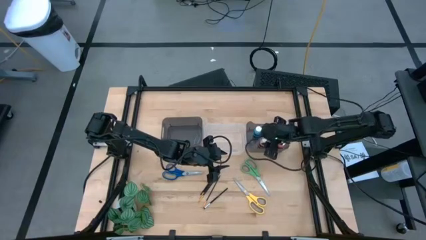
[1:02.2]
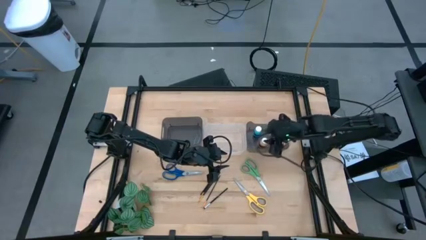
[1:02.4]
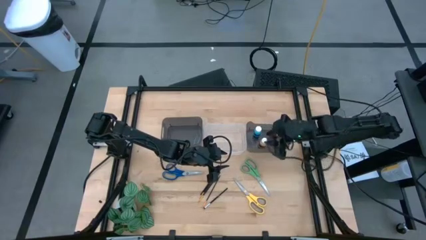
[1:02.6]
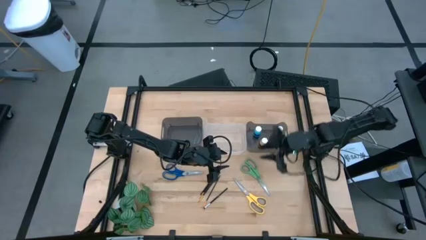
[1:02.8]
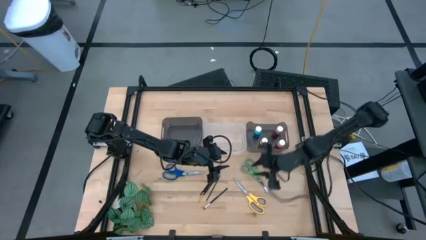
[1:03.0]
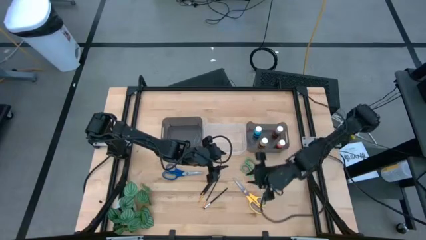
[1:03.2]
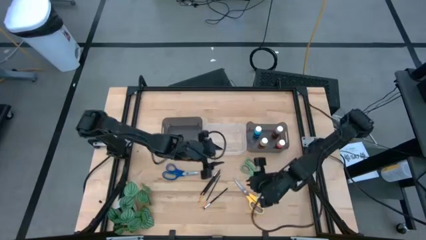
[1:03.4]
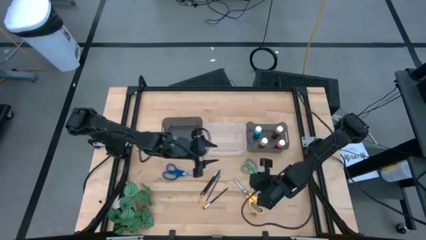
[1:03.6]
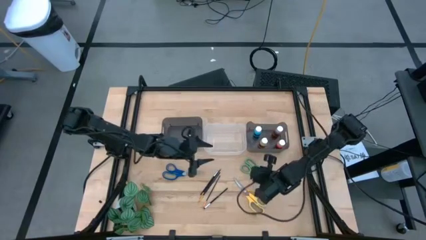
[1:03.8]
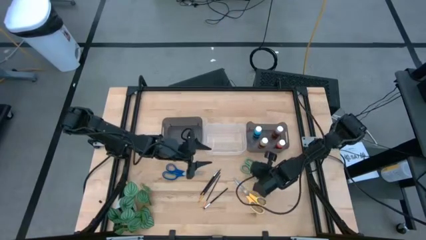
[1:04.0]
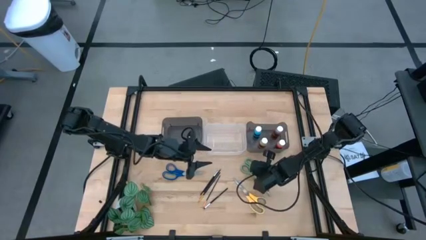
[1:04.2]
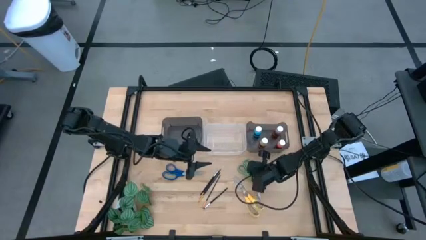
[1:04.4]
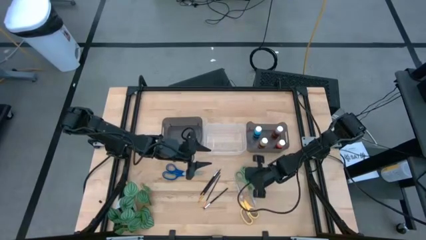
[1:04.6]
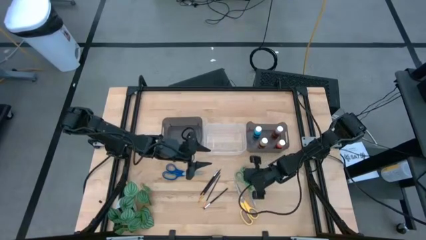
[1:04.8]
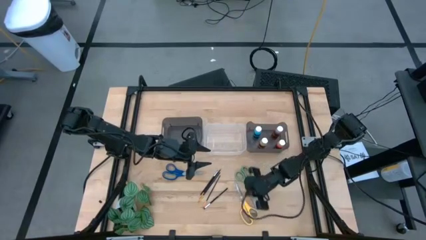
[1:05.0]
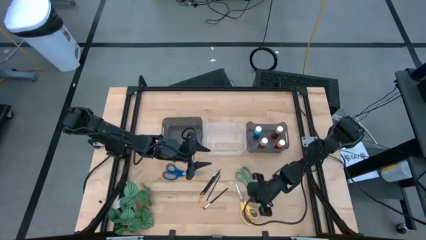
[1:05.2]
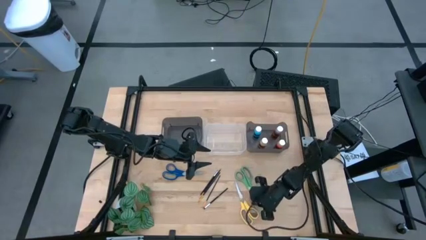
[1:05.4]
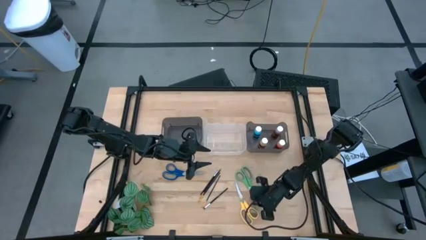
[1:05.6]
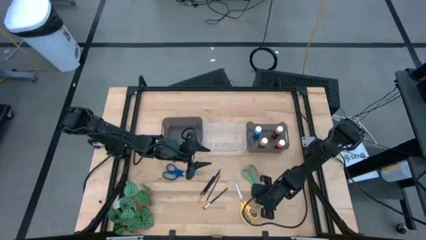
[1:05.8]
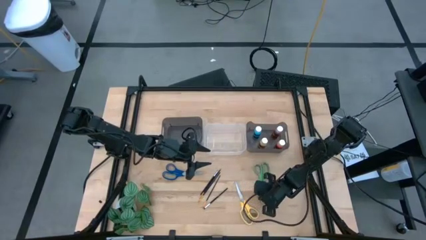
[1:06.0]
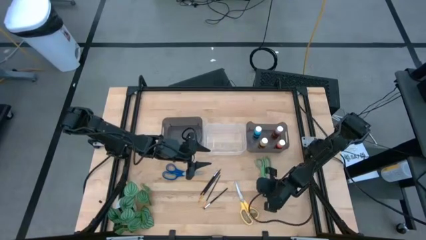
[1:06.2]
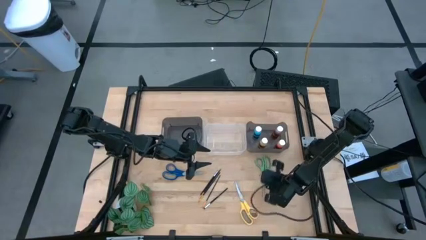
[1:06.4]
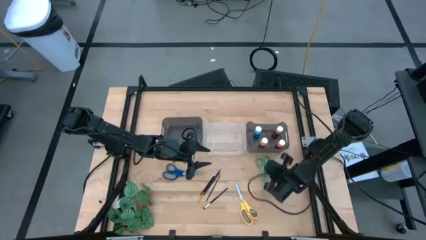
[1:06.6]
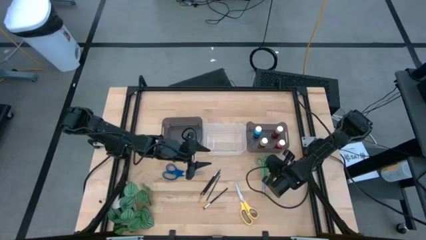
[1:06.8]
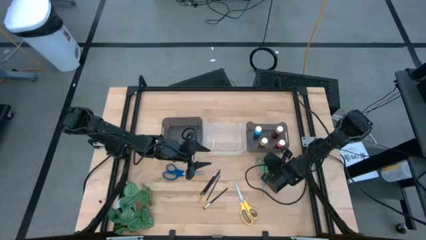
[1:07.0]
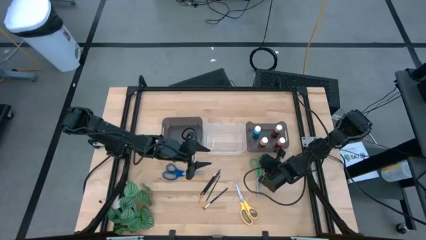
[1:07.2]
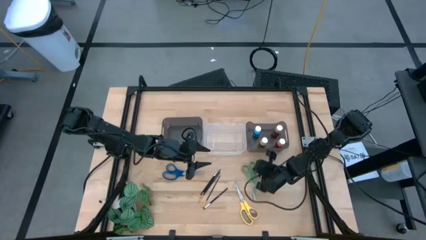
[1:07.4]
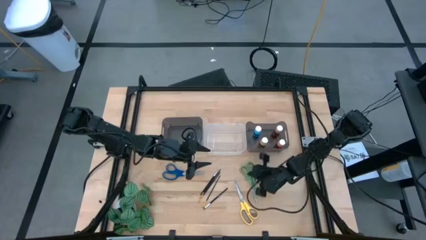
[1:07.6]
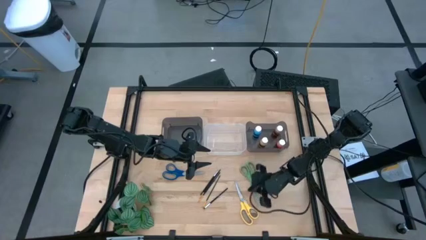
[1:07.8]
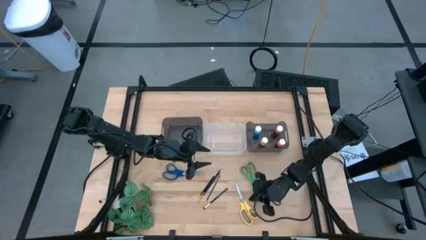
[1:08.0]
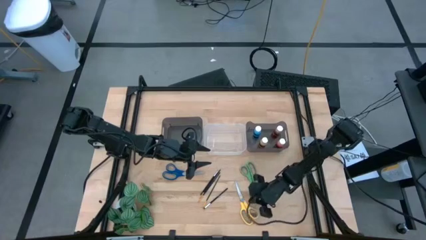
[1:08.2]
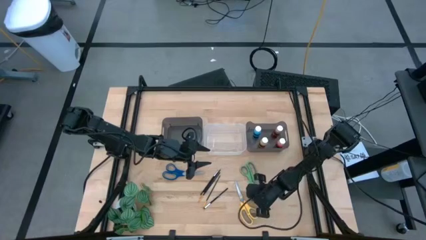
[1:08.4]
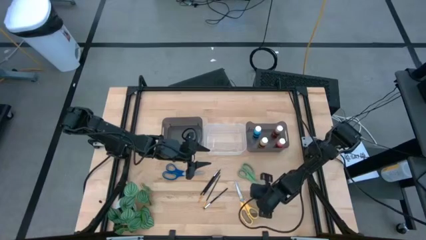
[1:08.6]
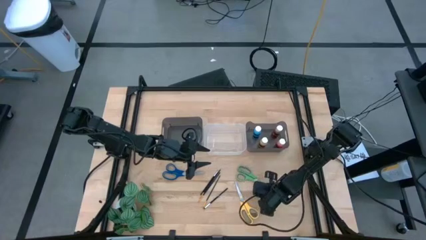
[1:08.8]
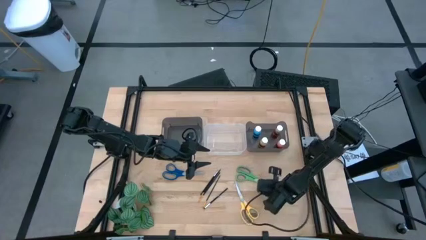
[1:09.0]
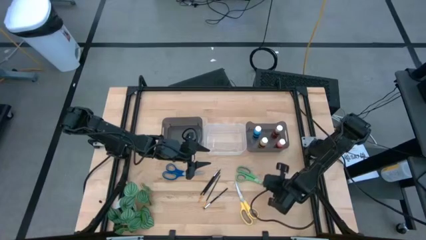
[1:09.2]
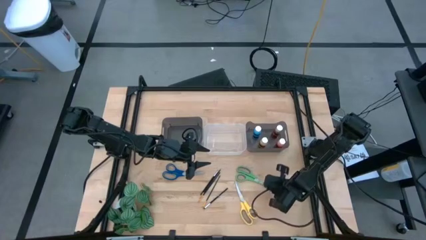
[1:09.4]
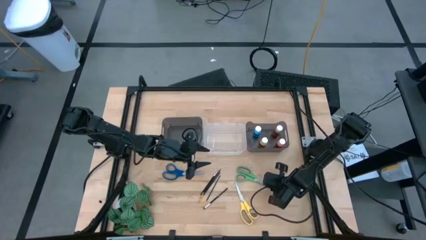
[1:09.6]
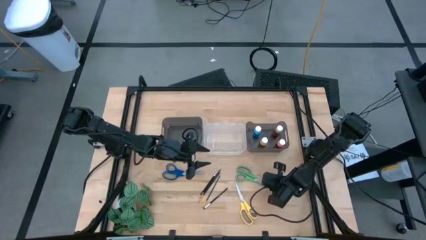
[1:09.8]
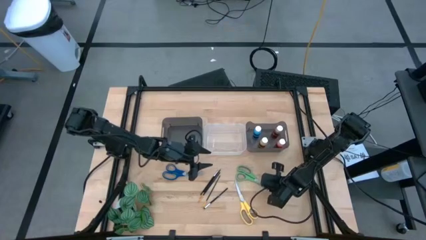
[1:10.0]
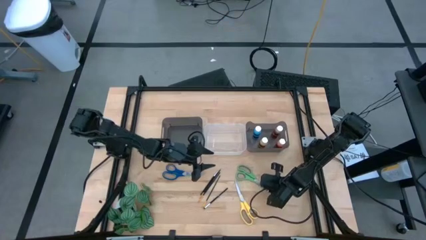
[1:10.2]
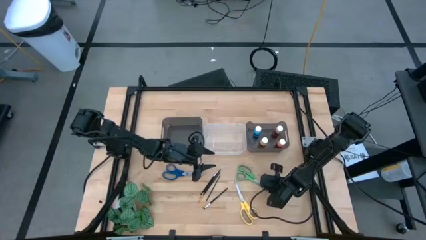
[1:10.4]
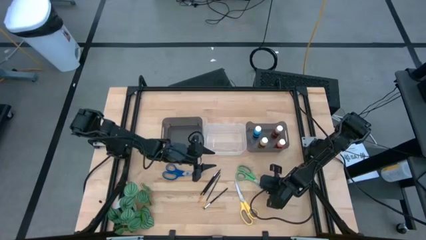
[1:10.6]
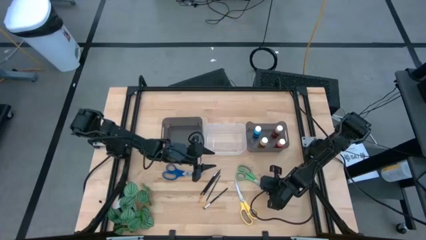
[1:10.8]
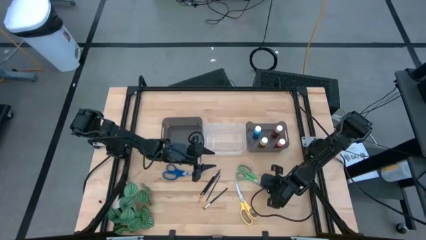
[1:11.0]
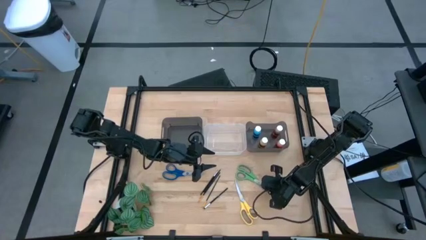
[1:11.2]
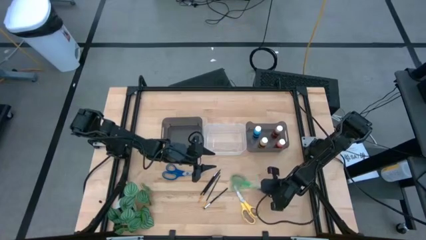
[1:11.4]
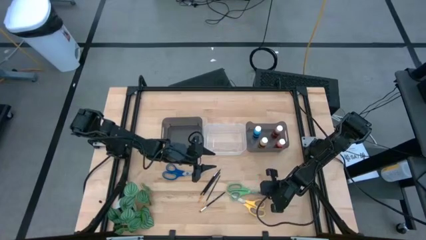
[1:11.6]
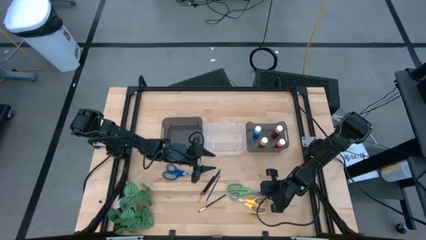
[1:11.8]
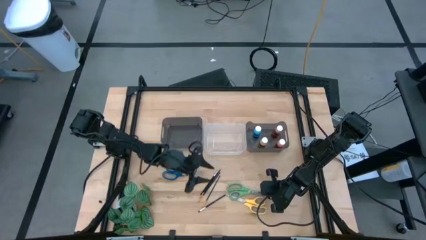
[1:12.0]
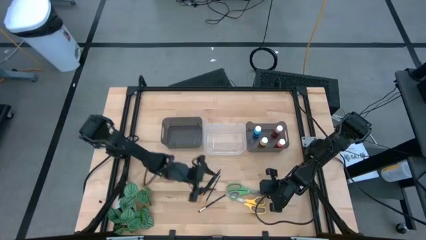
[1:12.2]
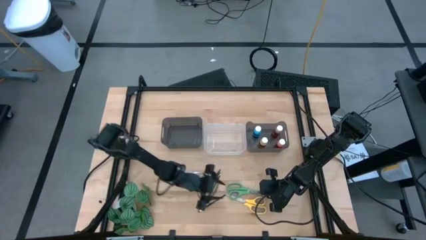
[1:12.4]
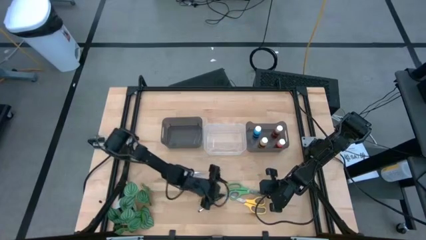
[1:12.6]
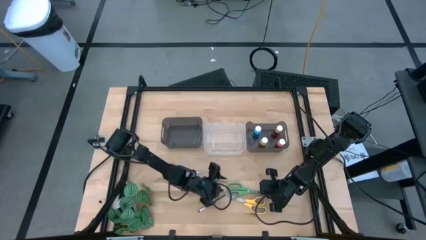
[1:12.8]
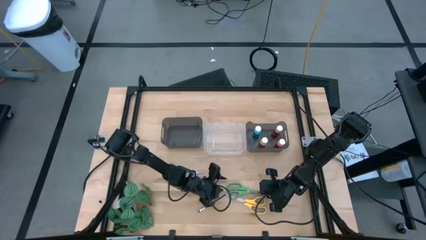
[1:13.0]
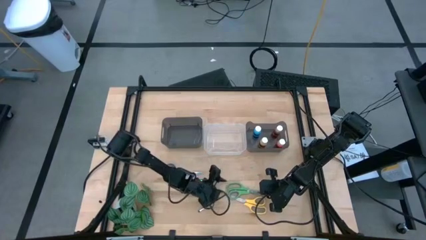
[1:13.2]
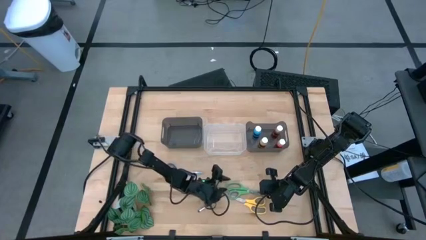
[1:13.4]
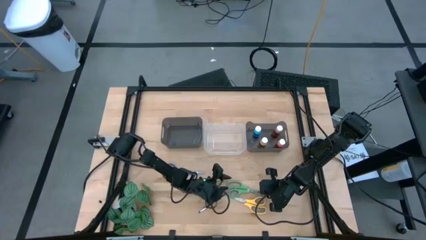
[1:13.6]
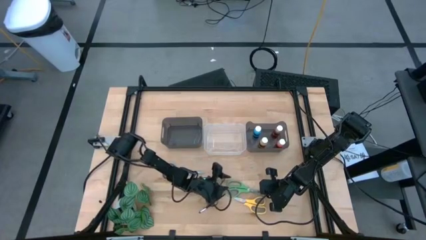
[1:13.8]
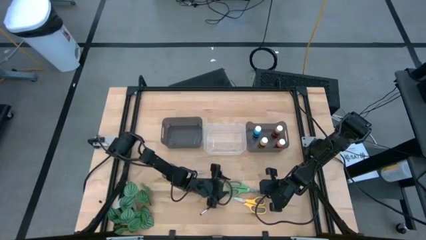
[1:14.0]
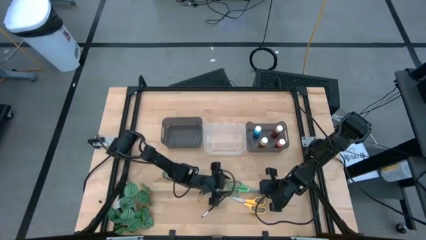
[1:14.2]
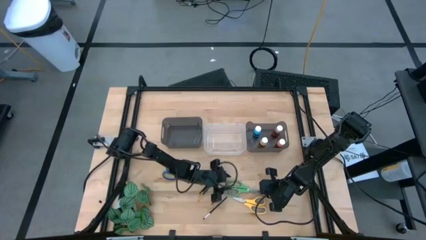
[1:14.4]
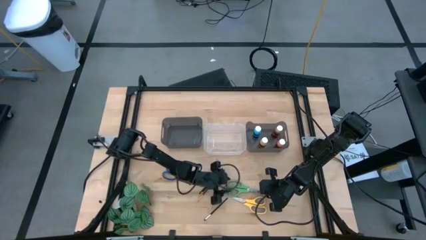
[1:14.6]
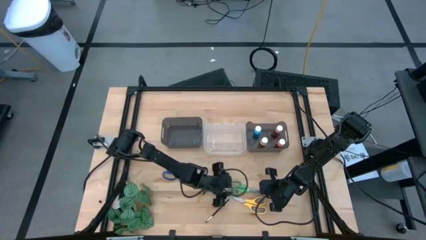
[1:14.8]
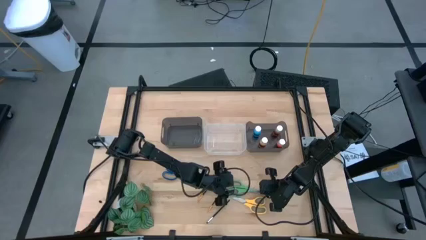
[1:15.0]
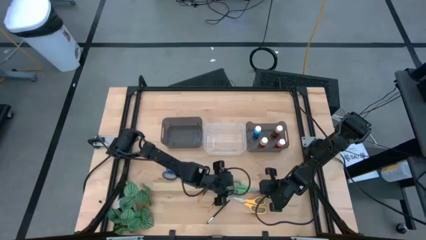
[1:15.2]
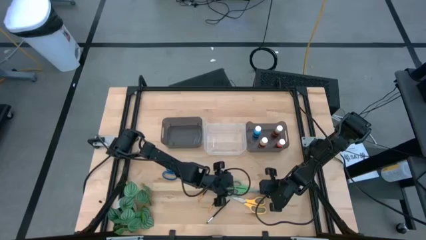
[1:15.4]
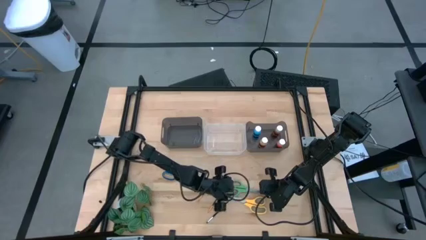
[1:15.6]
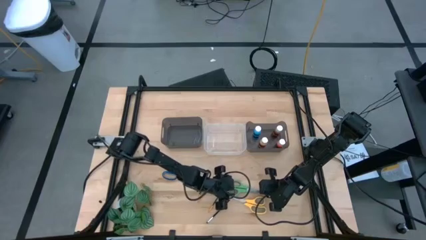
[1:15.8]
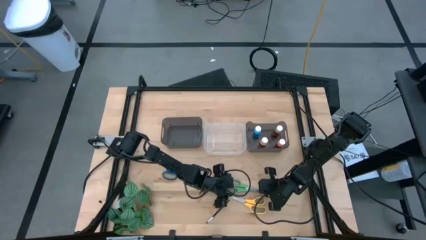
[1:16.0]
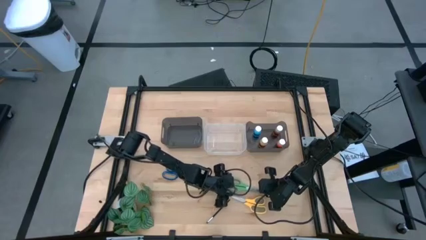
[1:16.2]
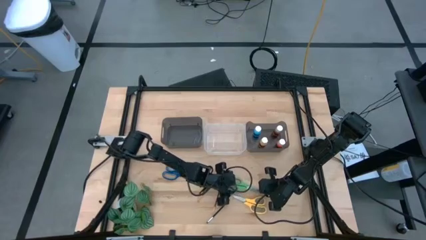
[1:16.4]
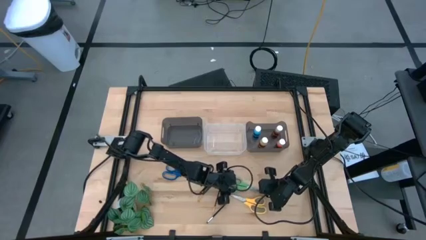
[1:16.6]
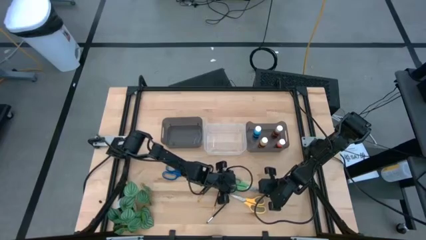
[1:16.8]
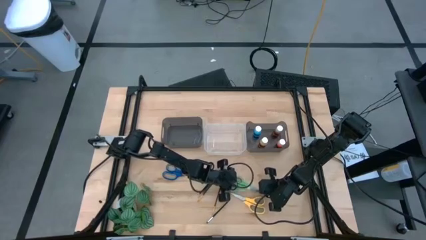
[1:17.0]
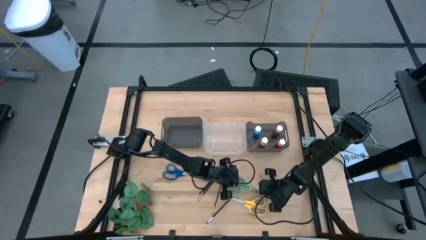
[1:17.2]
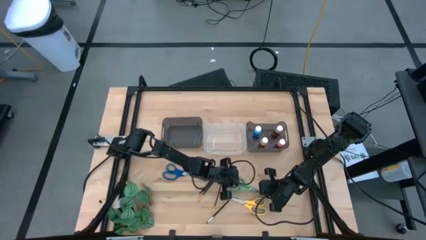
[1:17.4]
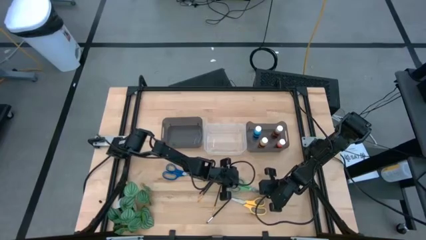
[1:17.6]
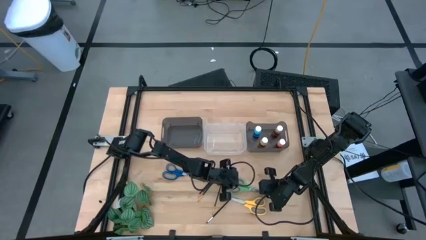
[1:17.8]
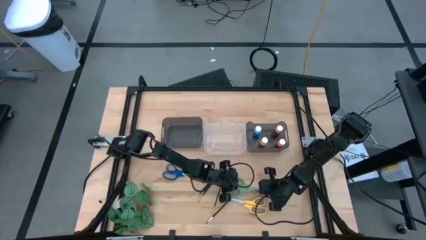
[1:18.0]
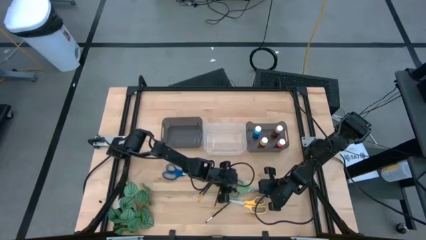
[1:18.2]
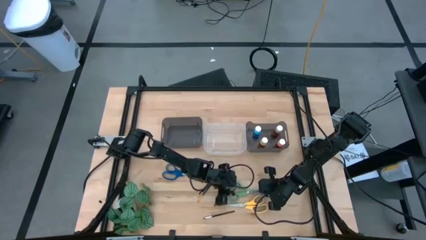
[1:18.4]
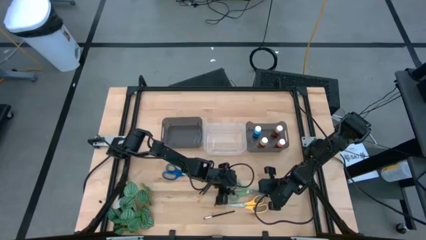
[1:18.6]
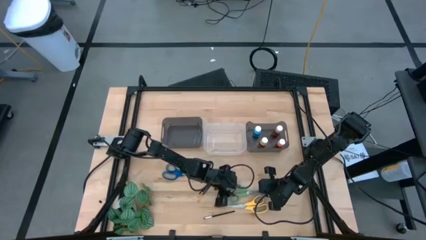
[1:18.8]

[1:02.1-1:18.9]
Task: Pick & Place Paint Supplies
Put the green scissors into the transparent bin
